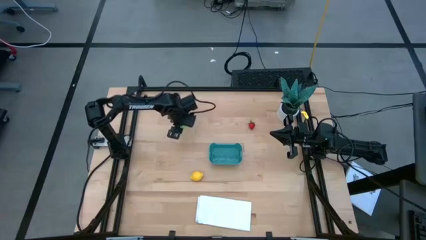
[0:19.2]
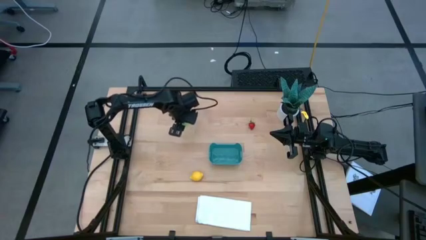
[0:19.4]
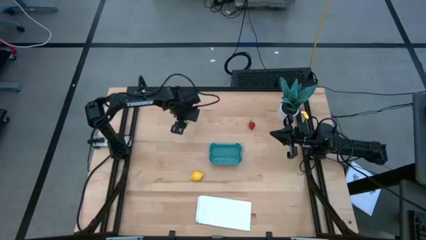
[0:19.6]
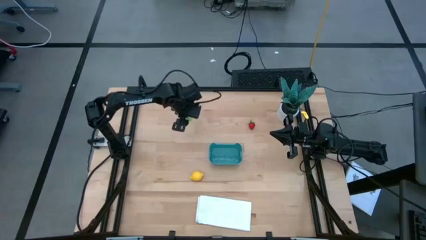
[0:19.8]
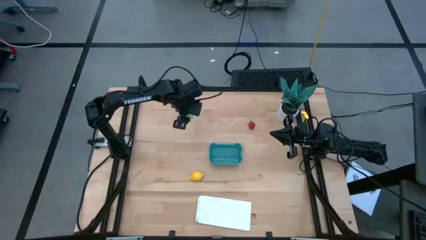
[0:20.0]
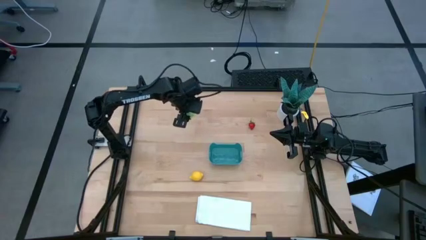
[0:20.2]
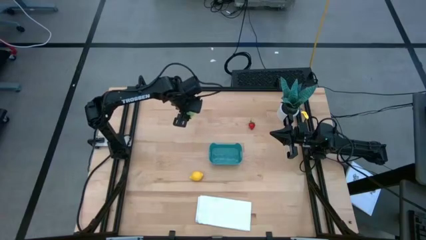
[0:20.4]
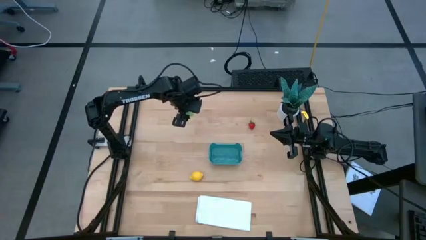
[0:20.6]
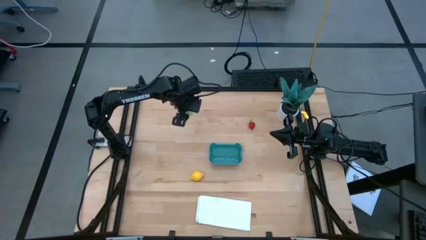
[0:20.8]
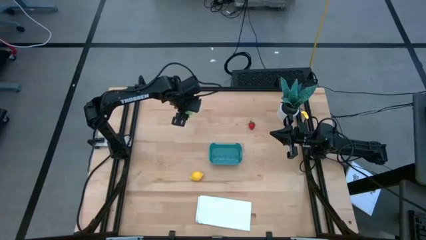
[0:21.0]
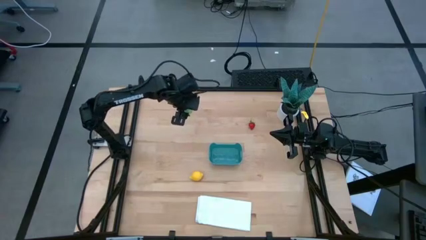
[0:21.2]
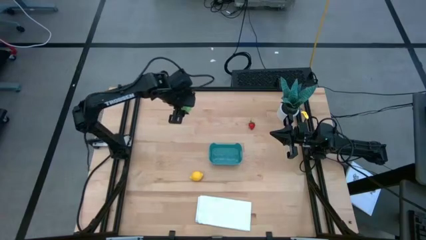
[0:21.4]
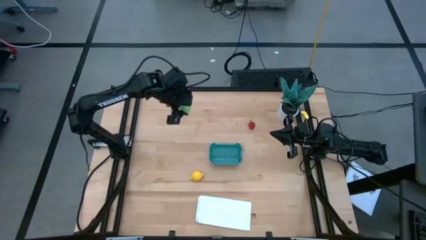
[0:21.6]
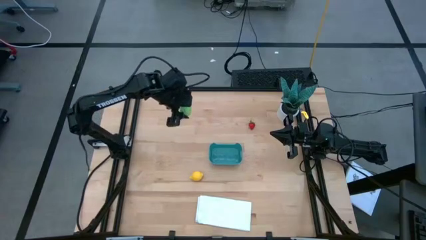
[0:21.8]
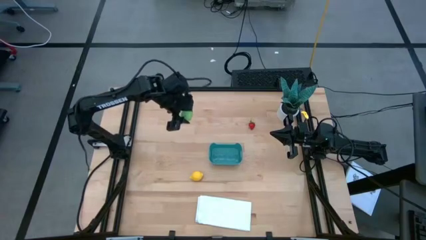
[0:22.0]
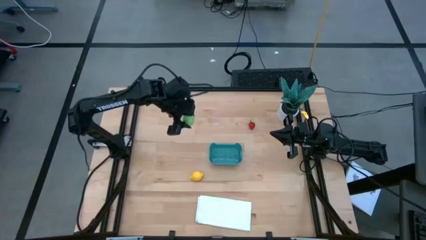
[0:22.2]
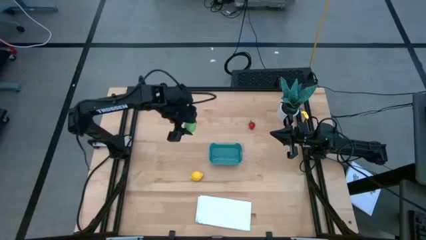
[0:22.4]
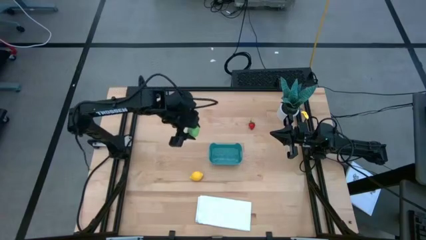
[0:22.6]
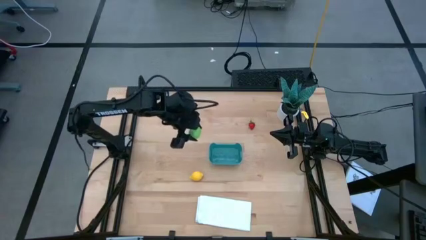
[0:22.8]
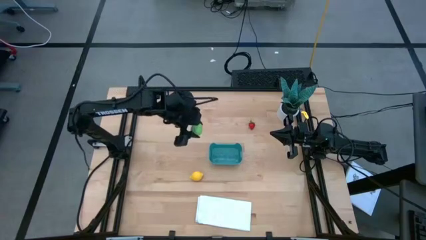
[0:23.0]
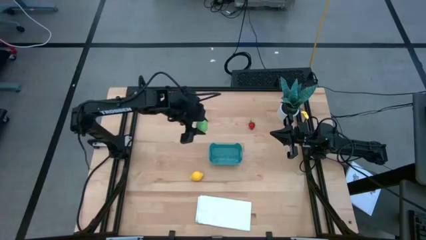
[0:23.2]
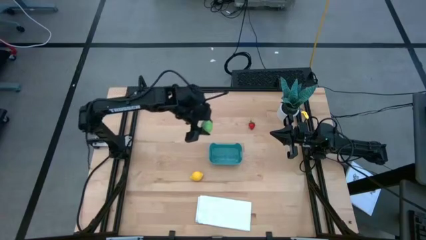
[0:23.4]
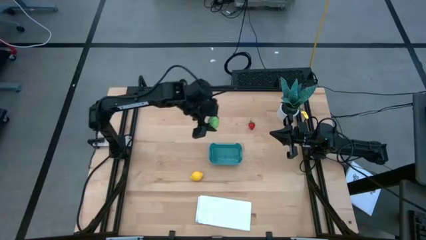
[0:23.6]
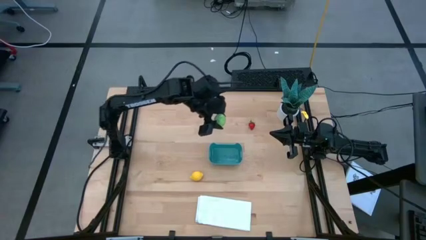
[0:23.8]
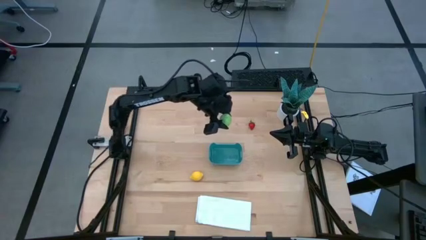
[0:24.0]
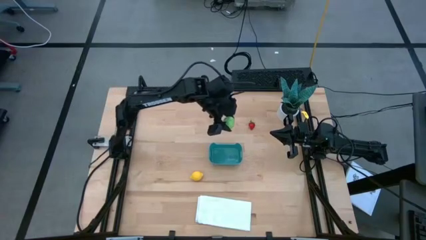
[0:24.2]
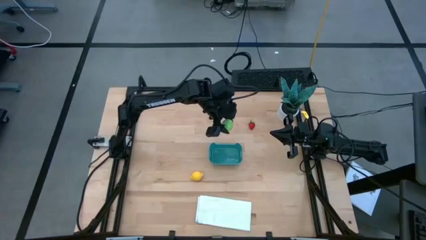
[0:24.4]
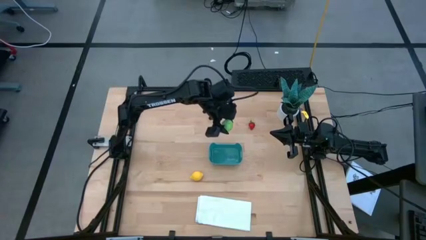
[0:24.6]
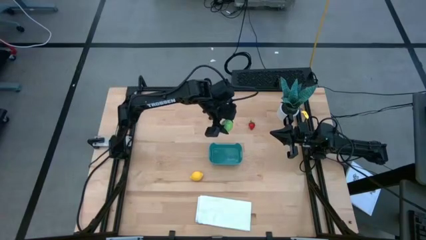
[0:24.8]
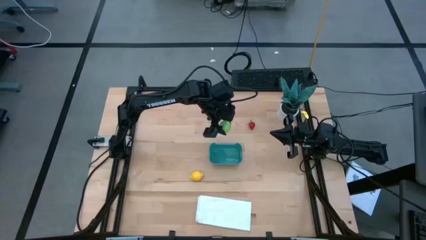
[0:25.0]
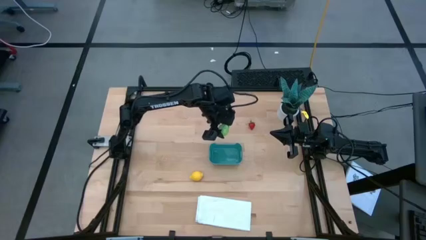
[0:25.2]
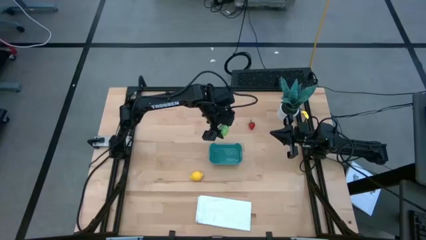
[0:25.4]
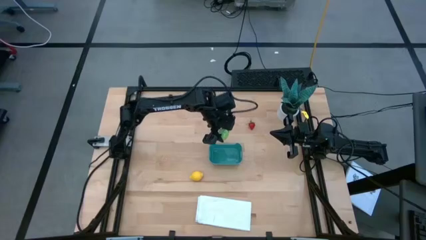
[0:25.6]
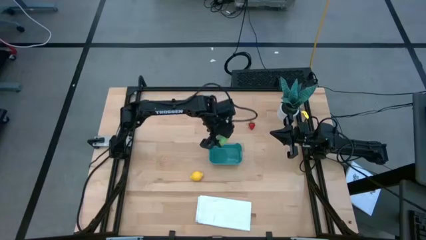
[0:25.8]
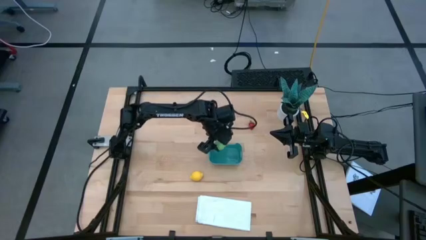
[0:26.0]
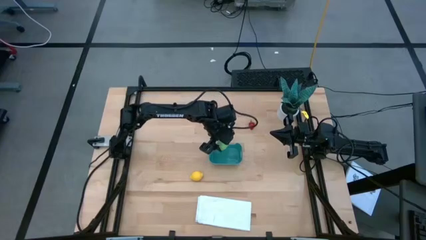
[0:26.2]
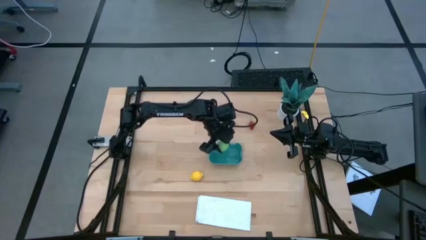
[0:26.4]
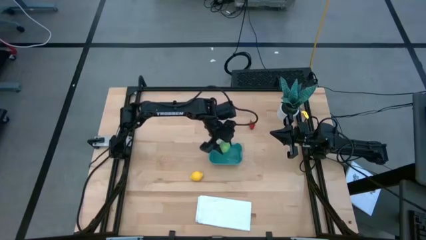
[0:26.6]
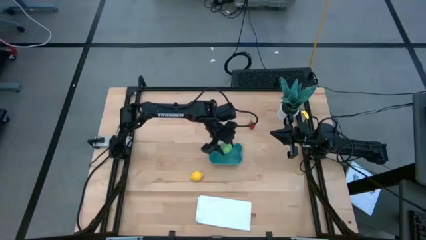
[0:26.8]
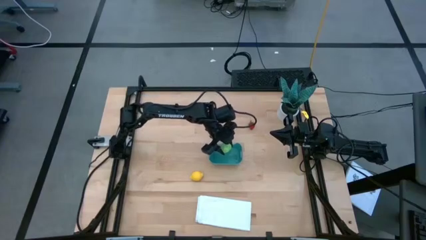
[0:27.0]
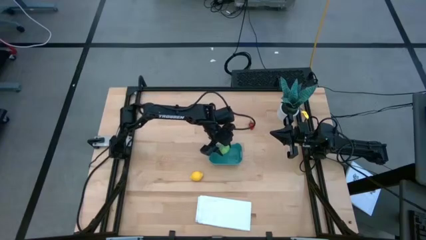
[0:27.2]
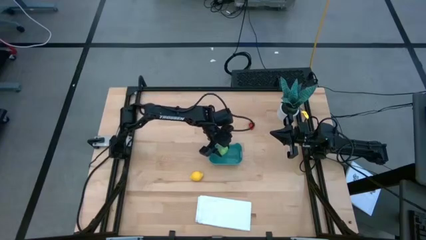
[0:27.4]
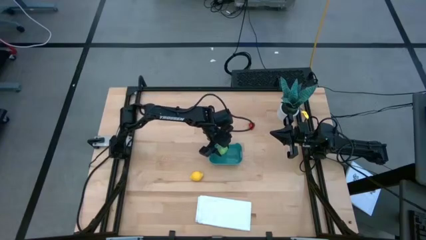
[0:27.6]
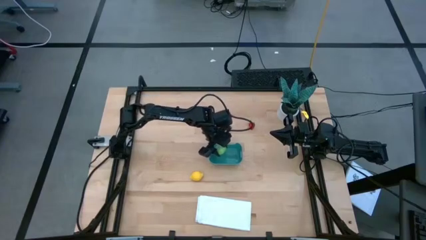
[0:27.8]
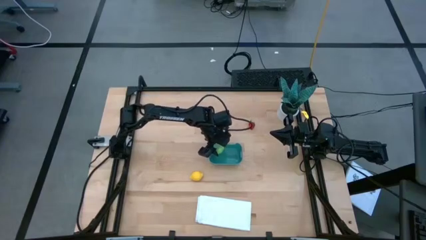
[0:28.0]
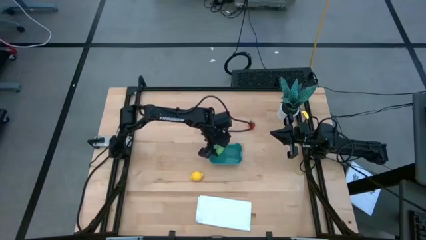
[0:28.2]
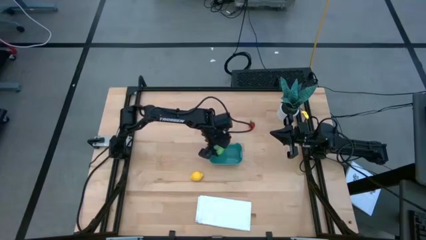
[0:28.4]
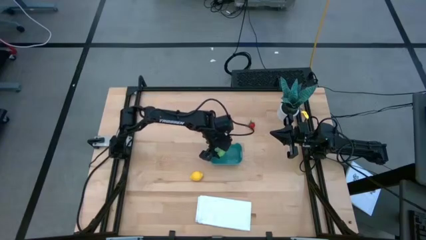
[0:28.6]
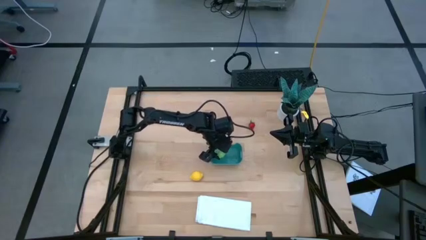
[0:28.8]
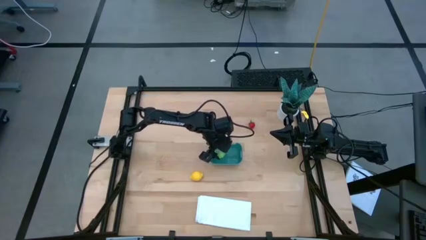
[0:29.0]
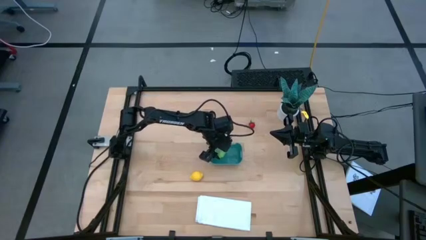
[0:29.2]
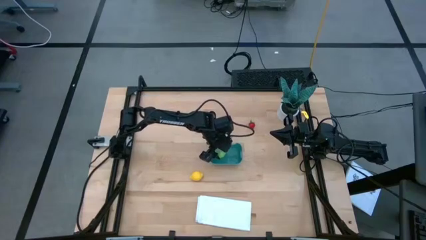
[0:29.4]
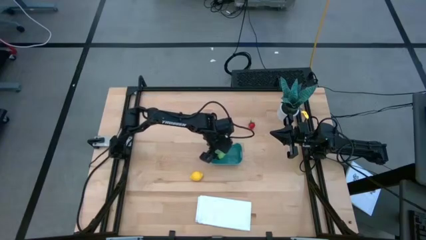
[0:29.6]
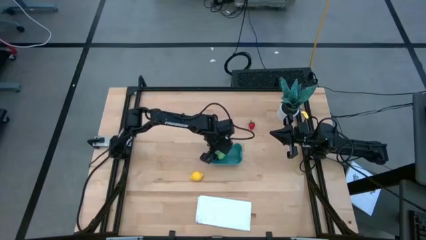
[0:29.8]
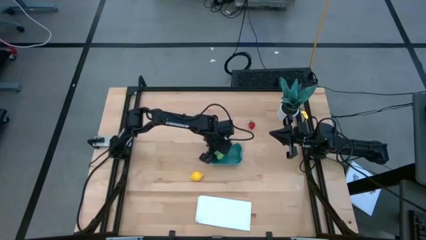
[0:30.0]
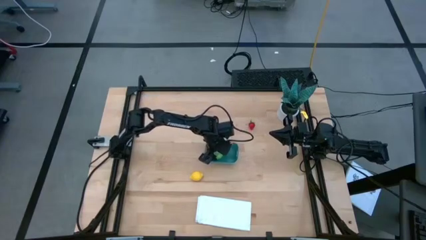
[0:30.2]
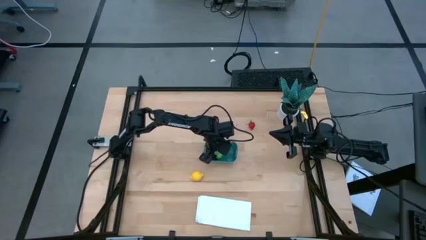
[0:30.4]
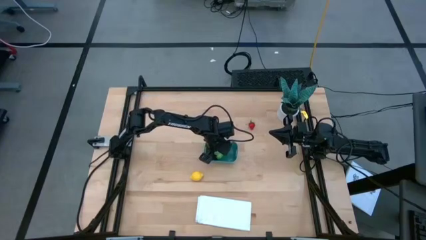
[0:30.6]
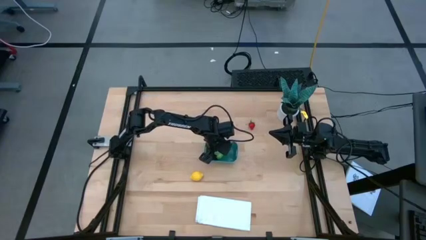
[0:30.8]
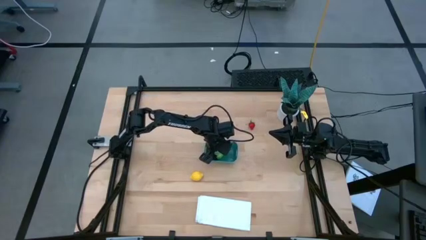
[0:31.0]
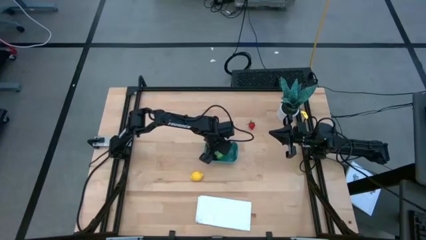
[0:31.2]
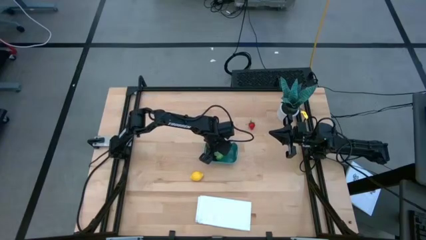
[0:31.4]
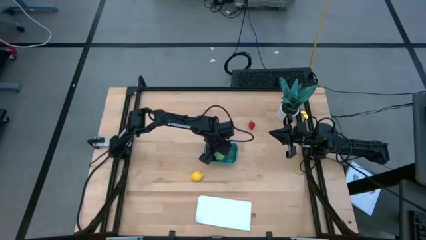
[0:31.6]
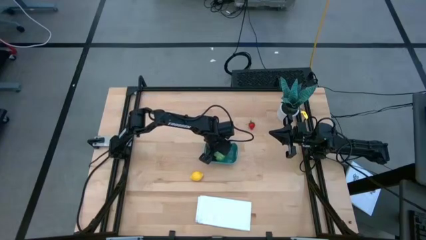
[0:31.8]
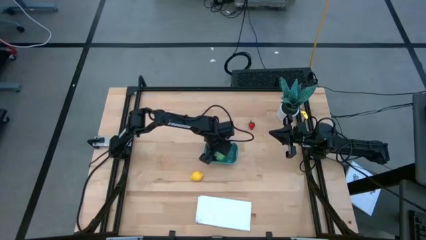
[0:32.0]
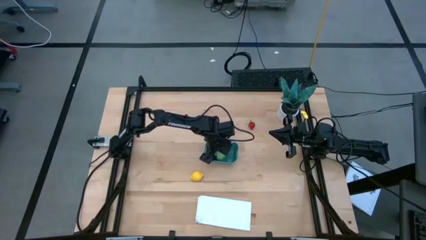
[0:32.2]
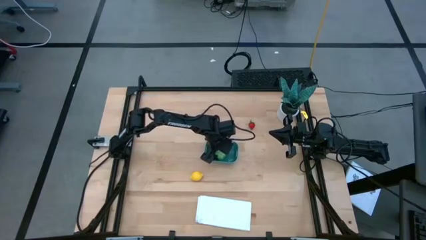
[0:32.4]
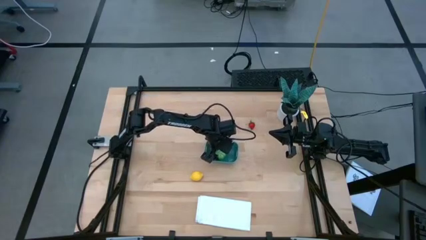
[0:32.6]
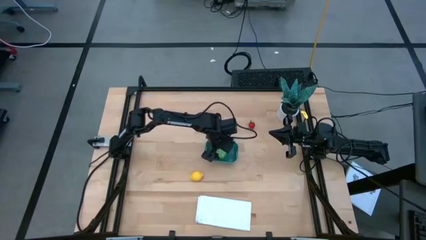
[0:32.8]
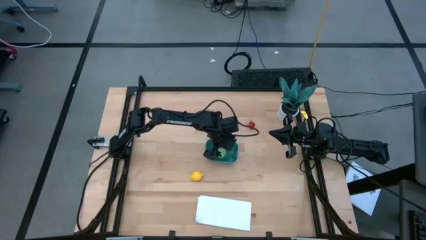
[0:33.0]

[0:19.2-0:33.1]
Task: Pick and placing Produce into tupperware
Put the green cabbage into the blue bin
